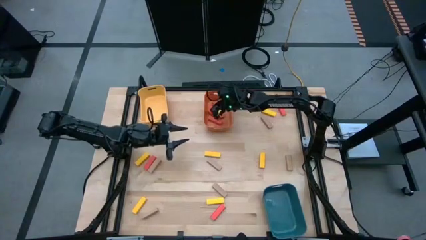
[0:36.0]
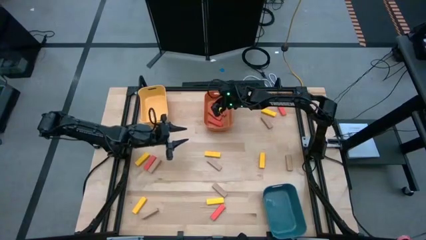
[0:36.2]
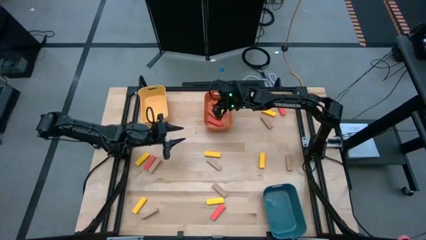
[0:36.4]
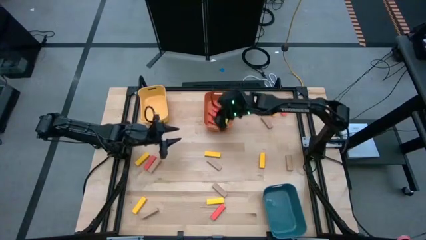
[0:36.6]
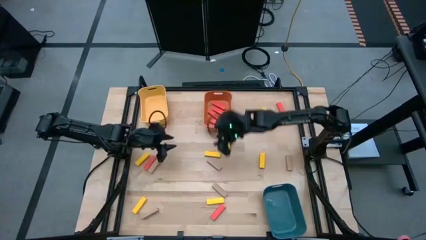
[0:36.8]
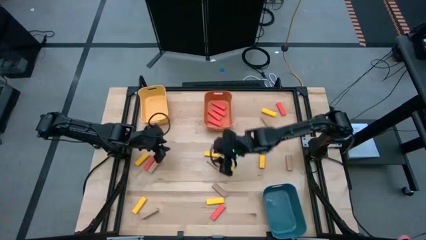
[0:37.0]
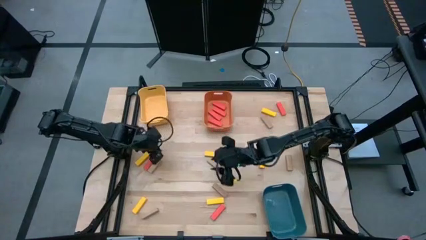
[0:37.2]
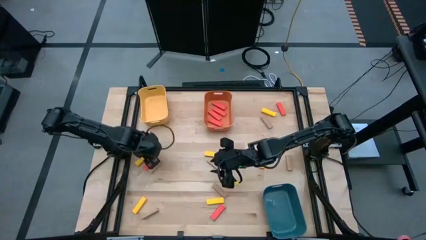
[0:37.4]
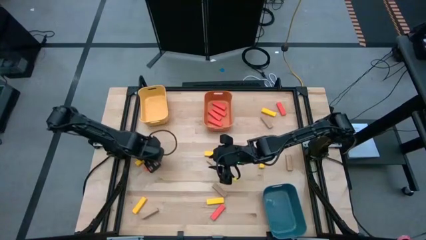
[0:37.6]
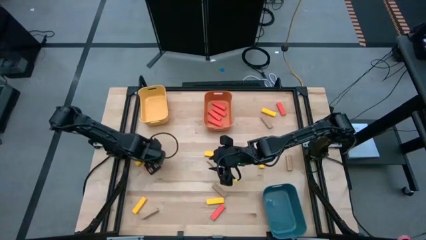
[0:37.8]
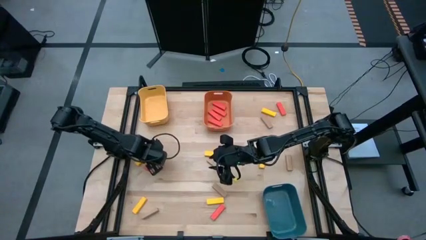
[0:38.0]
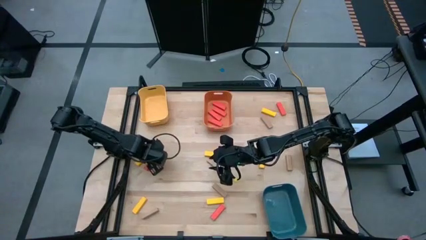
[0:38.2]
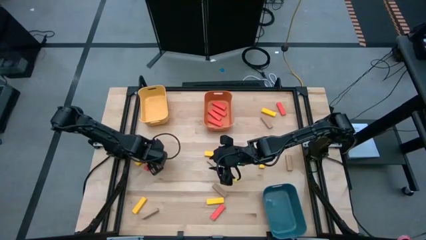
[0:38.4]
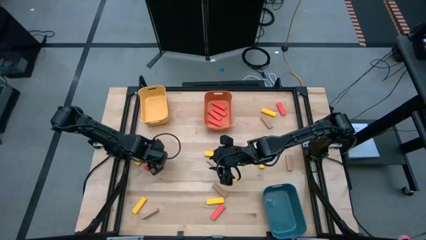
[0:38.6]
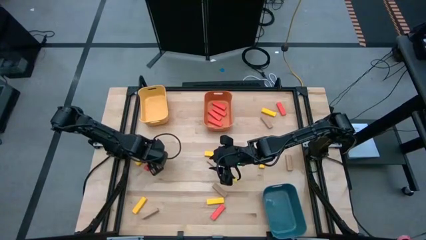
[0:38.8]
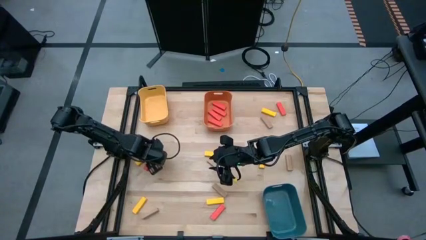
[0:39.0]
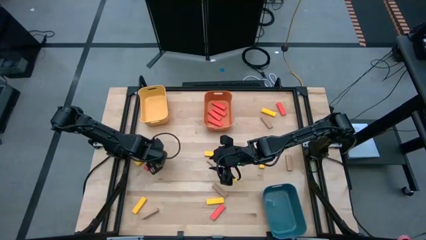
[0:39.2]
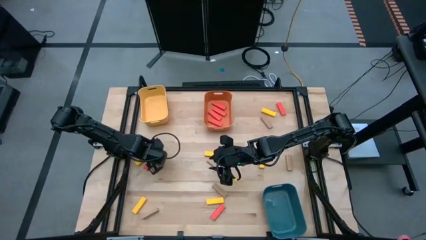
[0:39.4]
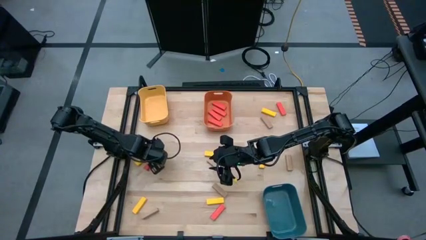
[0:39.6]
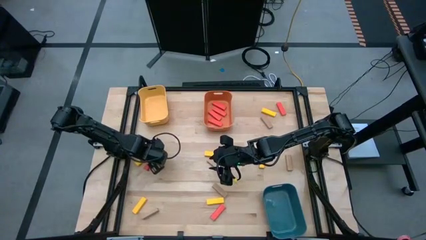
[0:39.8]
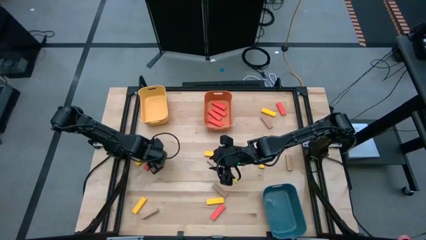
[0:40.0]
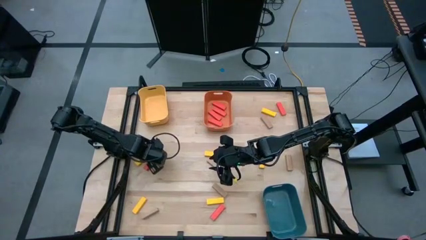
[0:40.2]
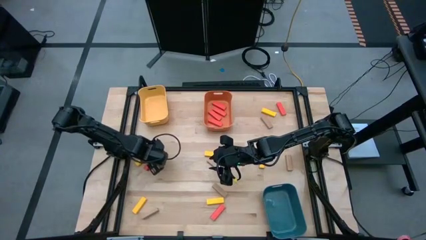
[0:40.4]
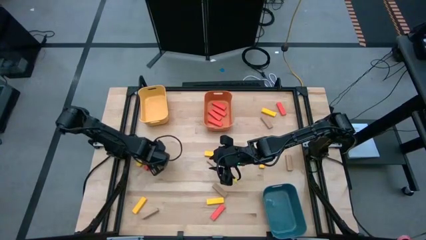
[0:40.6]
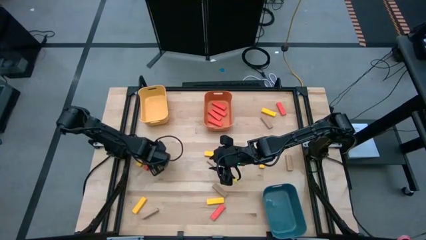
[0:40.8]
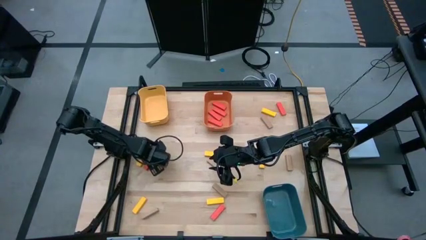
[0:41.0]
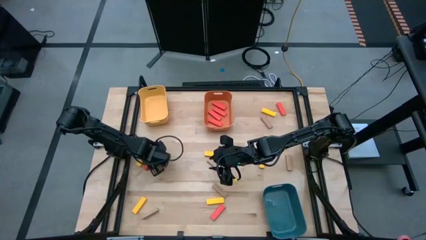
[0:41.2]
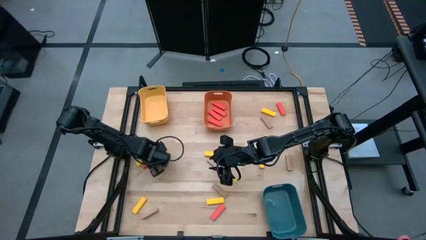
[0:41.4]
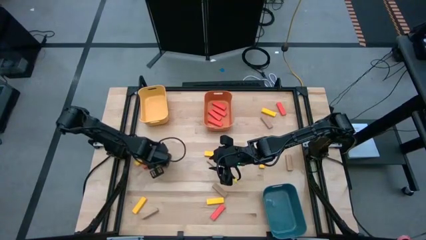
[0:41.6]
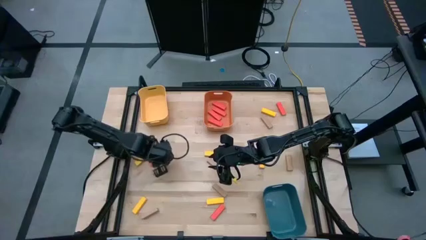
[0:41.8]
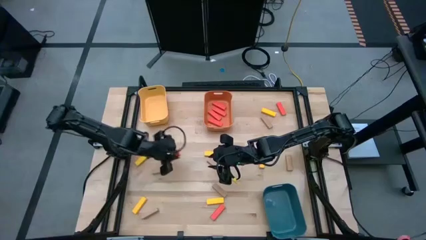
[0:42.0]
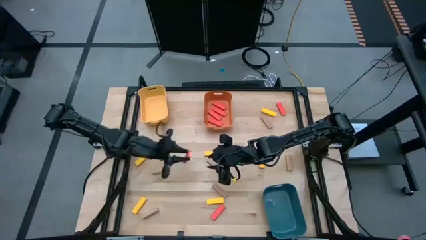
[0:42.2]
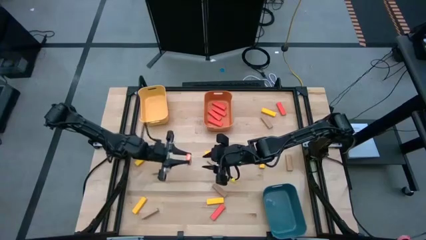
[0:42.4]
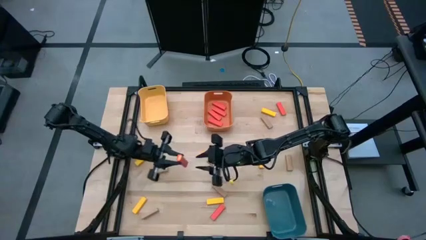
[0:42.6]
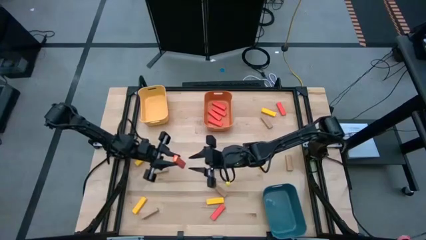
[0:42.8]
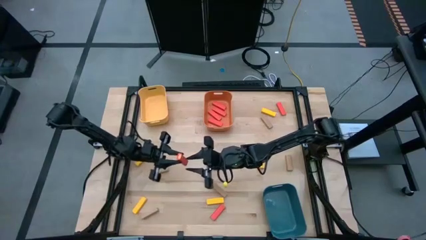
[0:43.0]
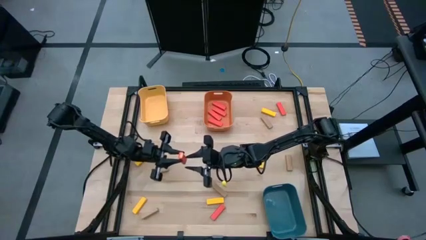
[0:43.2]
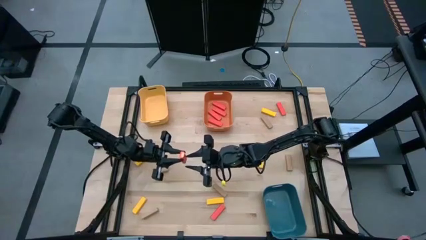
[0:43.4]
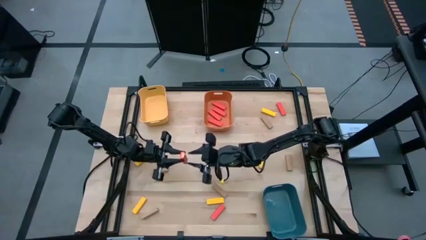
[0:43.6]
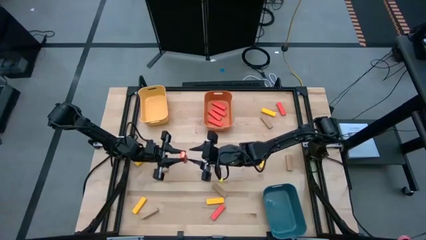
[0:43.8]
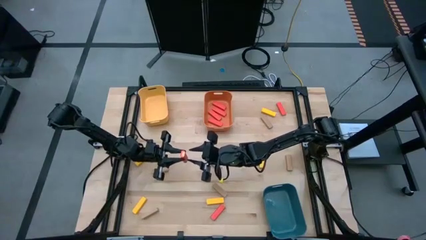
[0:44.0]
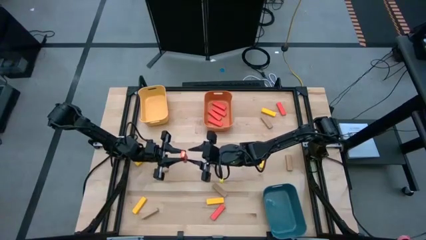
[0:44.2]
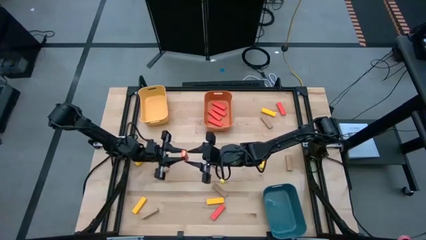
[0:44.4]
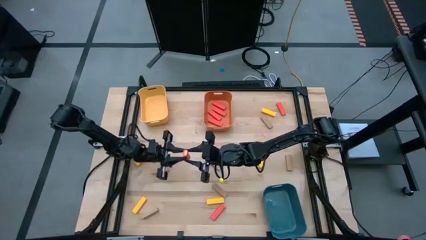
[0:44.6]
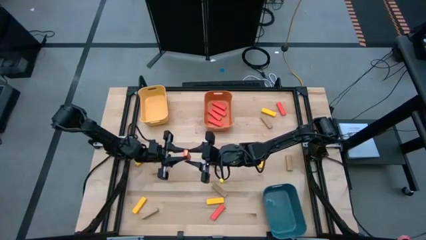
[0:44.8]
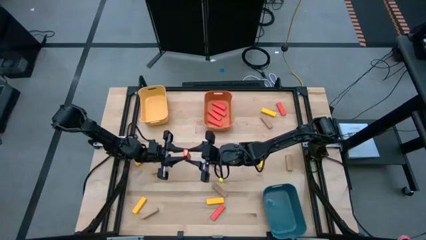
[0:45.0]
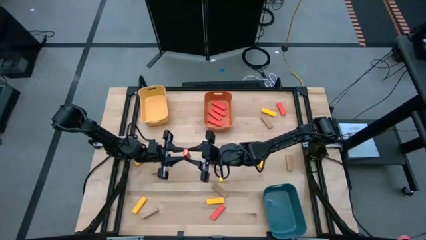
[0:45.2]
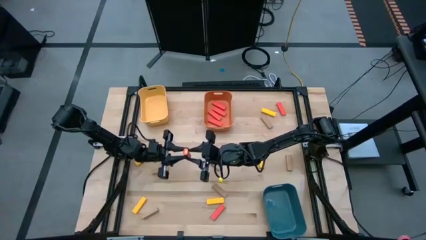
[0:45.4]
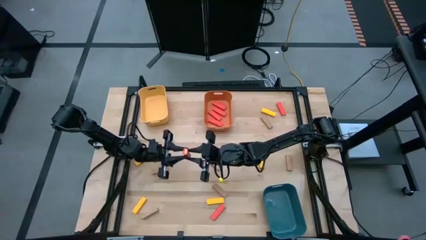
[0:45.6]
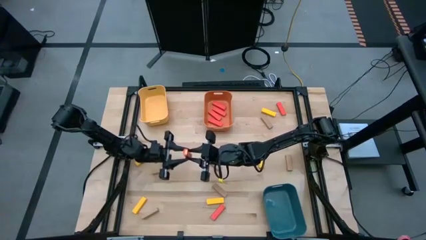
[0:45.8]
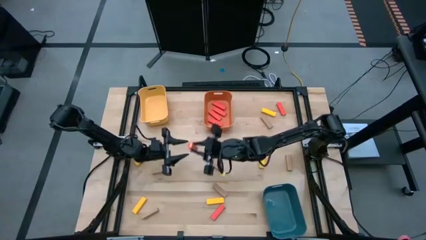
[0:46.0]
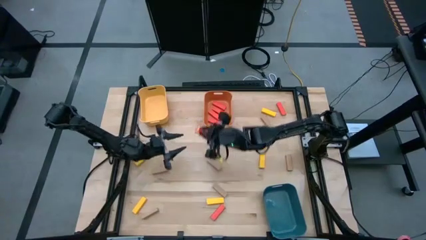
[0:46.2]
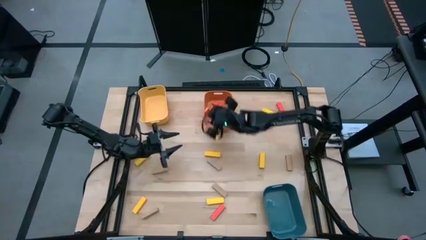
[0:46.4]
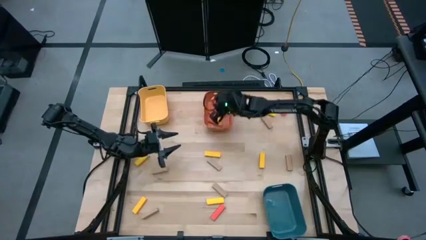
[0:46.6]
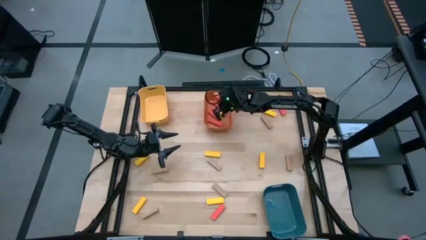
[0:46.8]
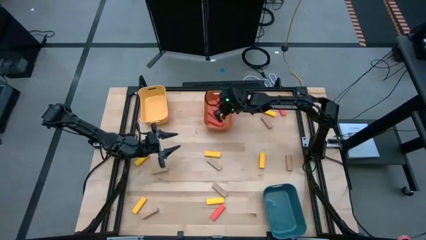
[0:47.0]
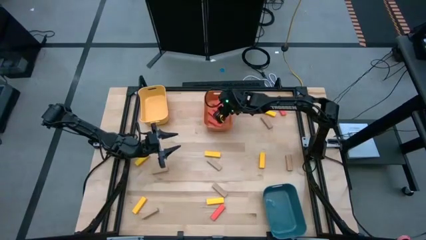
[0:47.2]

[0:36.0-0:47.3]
Task: Sort blocks
Put the orange block into the orange bin

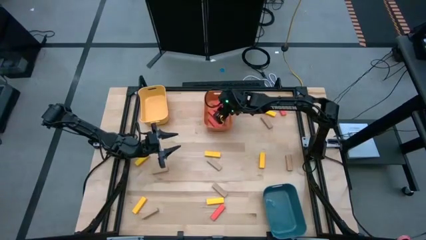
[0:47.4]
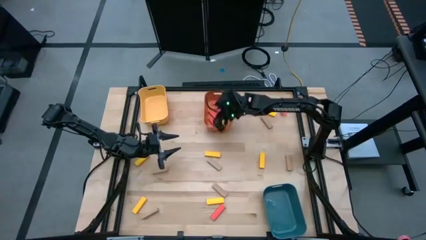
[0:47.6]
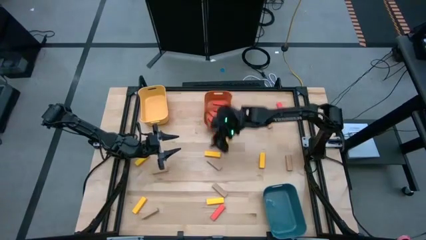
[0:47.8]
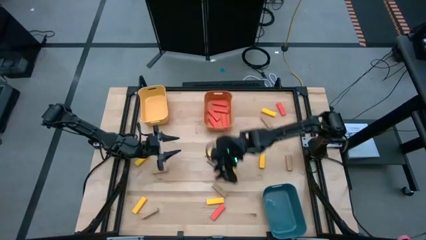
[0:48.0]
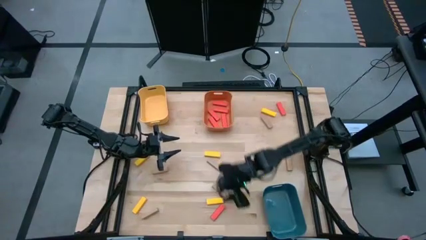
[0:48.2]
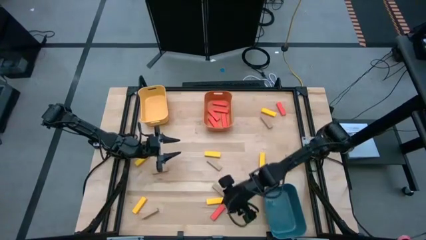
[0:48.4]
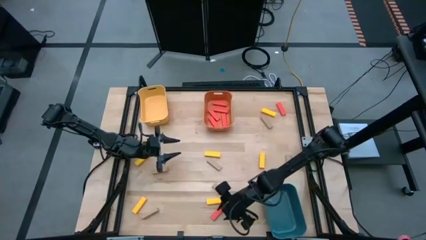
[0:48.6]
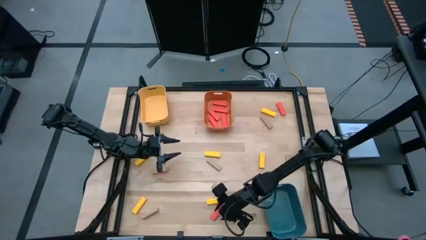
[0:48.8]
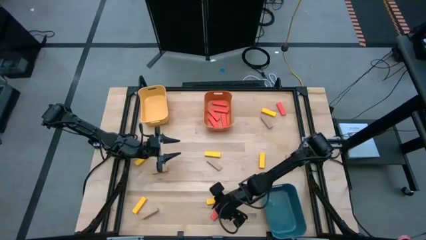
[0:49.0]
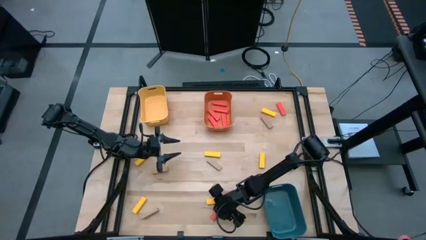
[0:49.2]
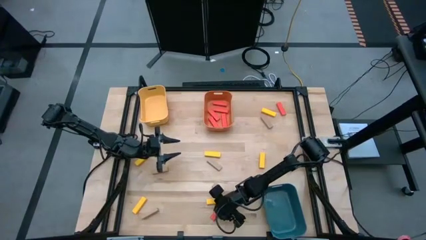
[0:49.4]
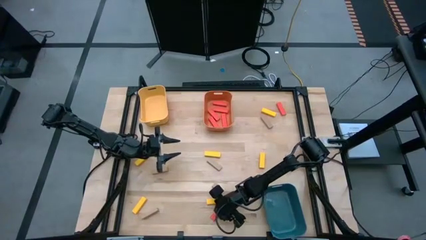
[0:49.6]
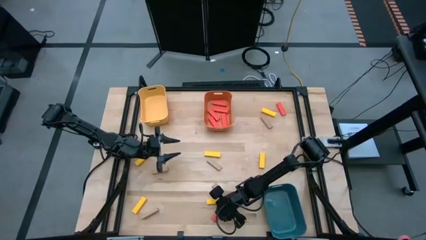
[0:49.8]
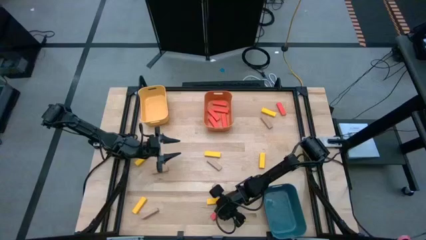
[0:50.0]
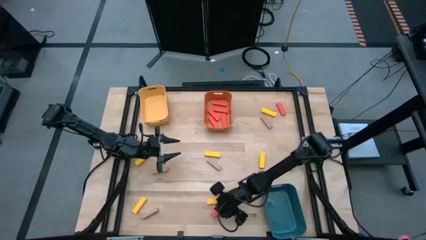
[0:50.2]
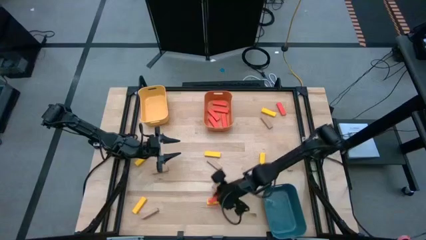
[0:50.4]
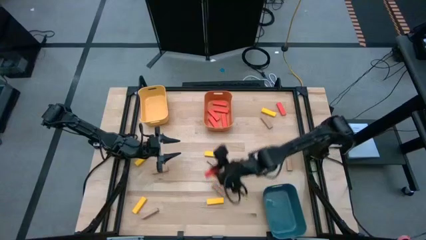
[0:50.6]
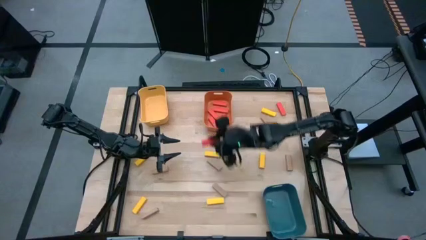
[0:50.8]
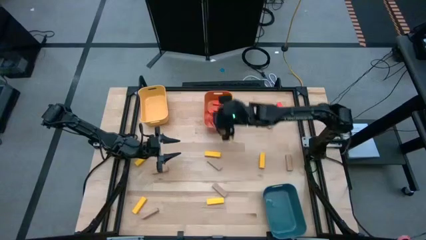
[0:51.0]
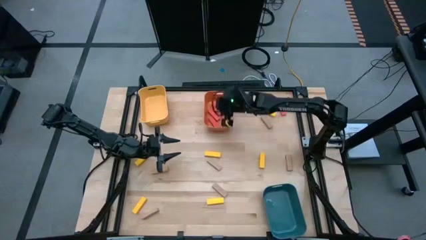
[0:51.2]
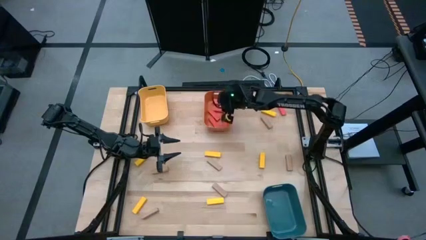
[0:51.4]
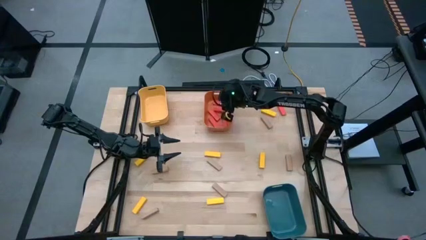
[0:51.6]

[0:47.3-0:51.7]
Put the orange block into the orange bin
